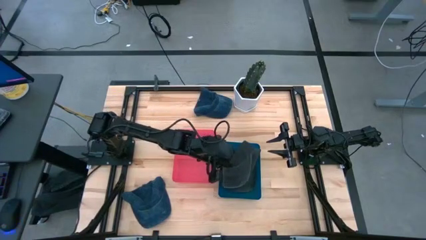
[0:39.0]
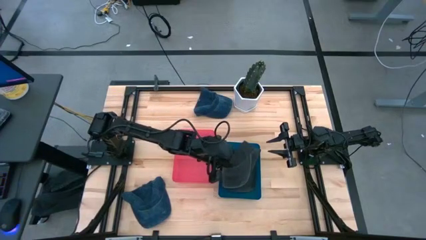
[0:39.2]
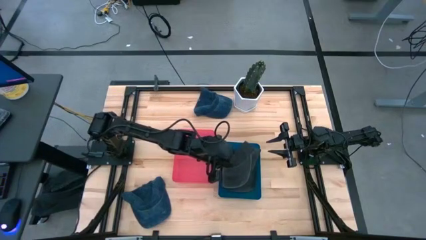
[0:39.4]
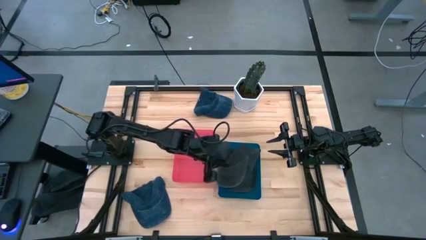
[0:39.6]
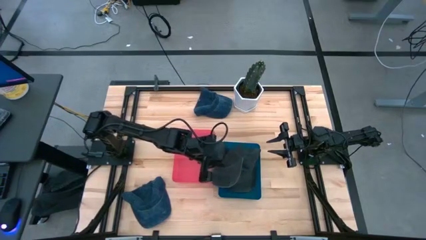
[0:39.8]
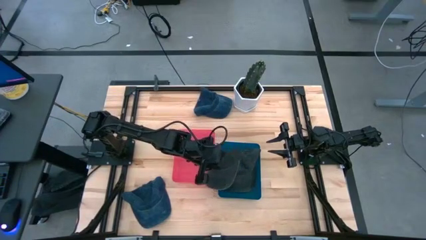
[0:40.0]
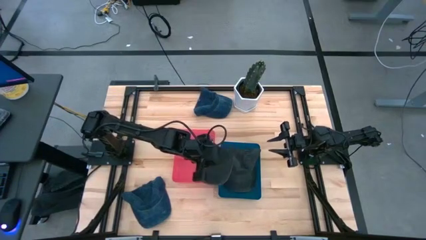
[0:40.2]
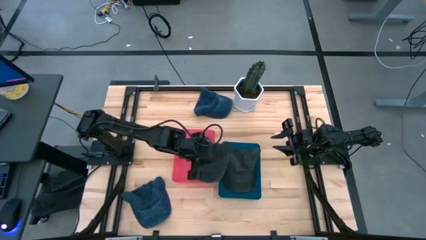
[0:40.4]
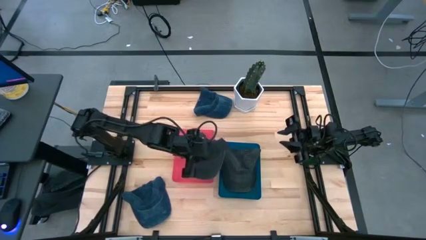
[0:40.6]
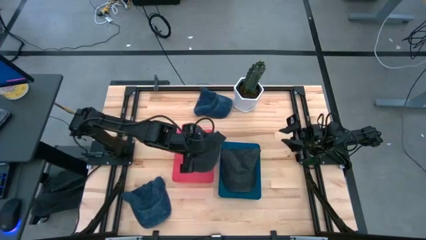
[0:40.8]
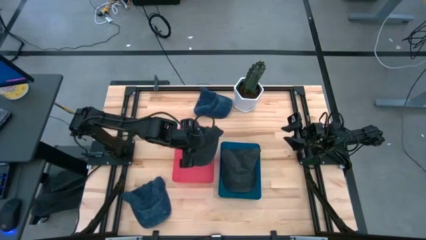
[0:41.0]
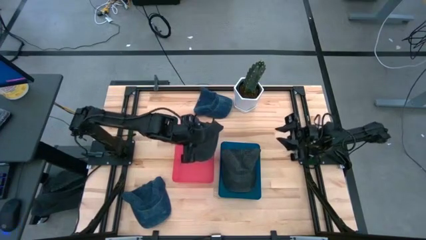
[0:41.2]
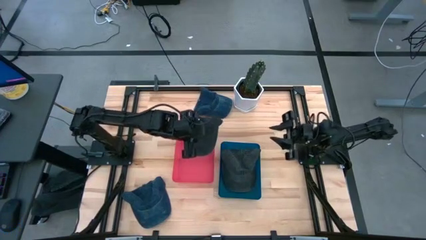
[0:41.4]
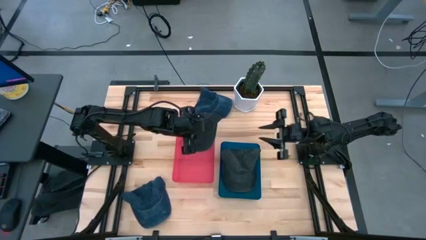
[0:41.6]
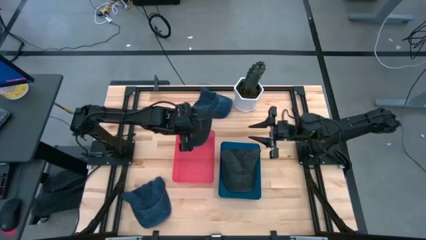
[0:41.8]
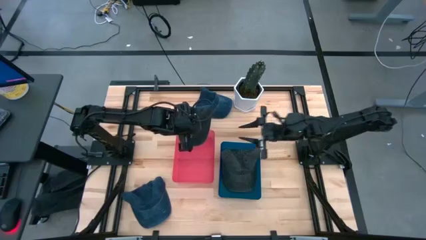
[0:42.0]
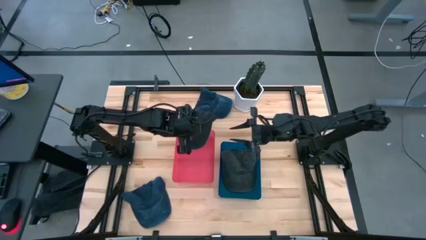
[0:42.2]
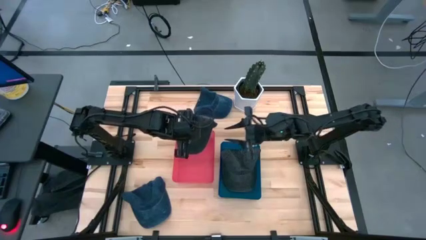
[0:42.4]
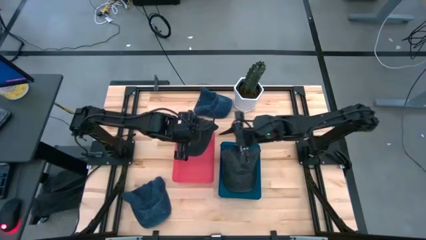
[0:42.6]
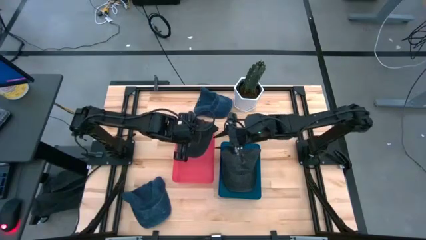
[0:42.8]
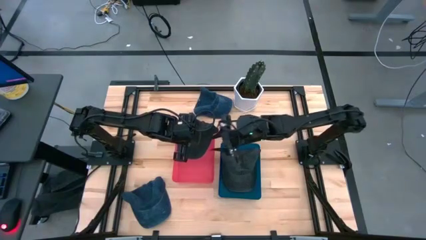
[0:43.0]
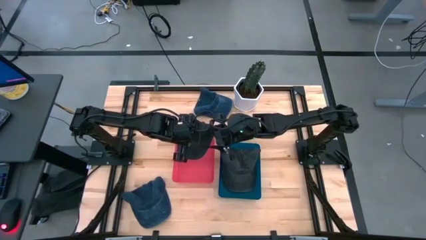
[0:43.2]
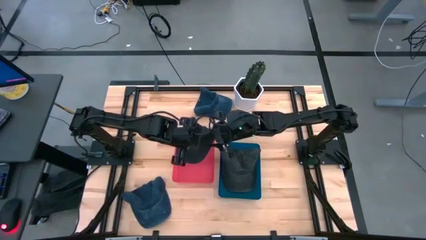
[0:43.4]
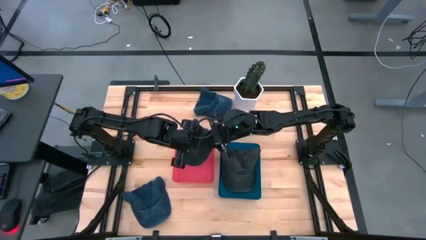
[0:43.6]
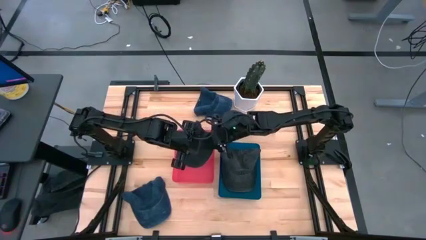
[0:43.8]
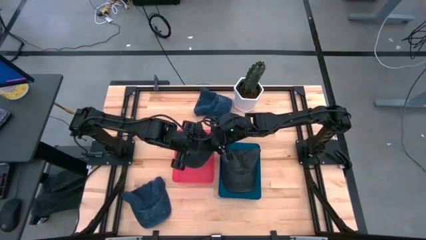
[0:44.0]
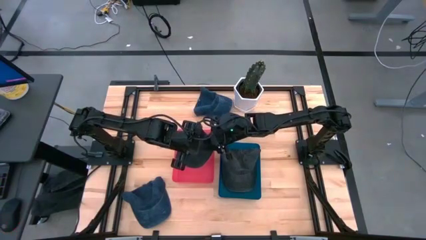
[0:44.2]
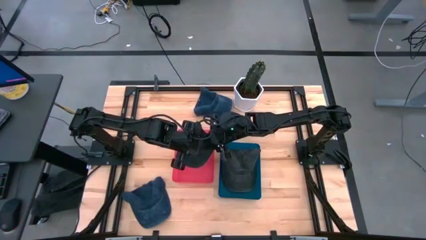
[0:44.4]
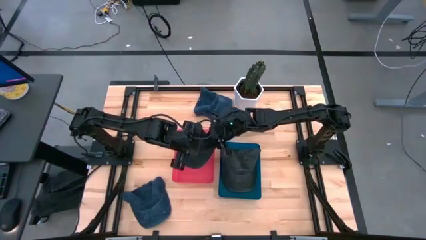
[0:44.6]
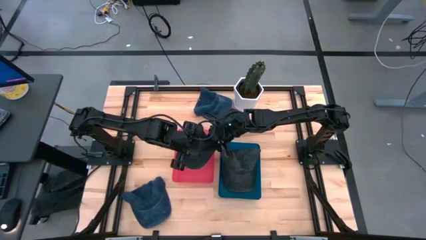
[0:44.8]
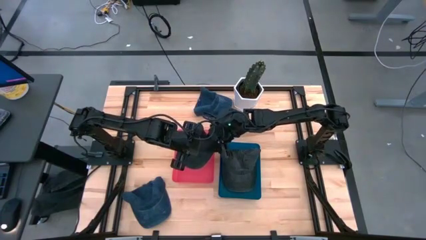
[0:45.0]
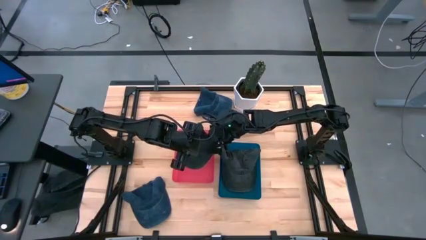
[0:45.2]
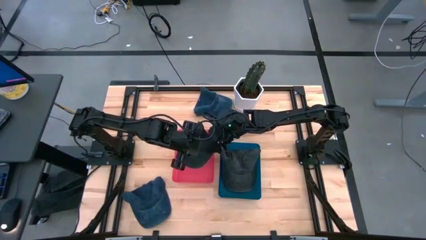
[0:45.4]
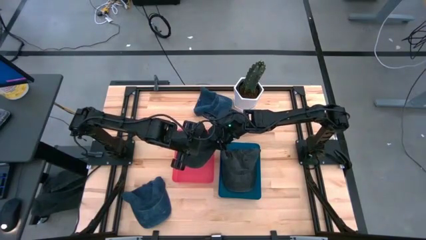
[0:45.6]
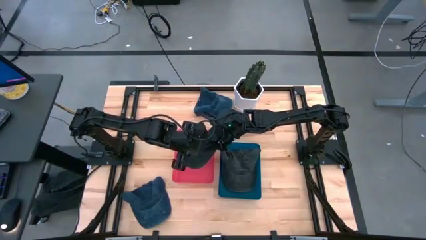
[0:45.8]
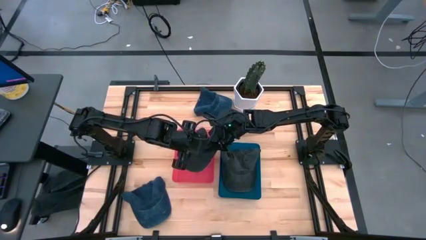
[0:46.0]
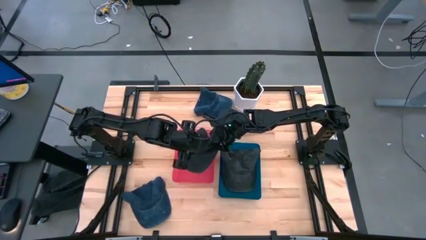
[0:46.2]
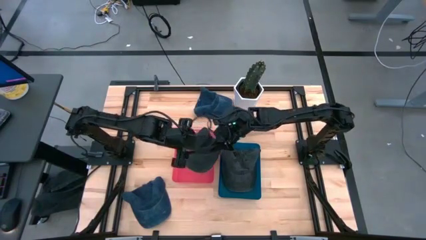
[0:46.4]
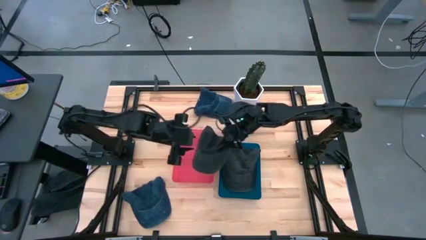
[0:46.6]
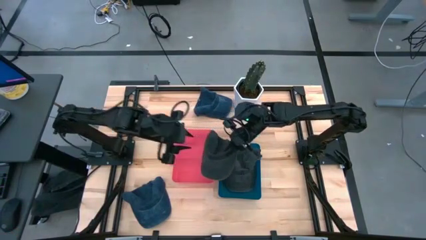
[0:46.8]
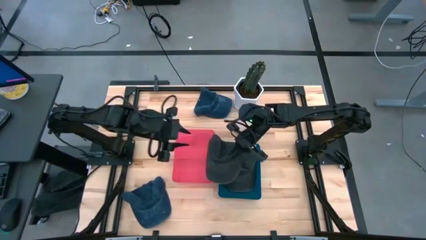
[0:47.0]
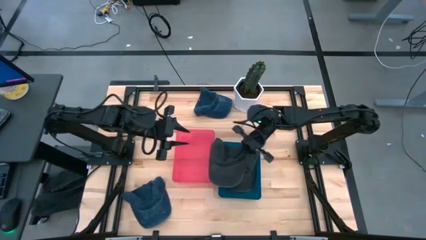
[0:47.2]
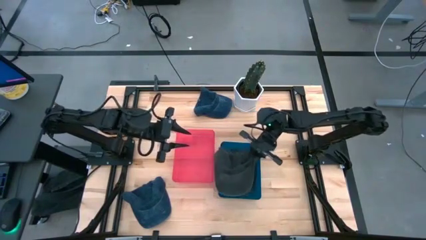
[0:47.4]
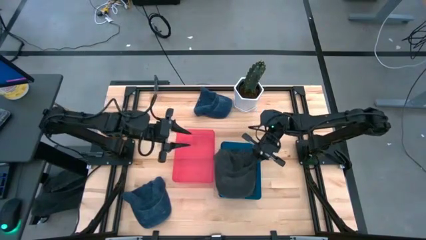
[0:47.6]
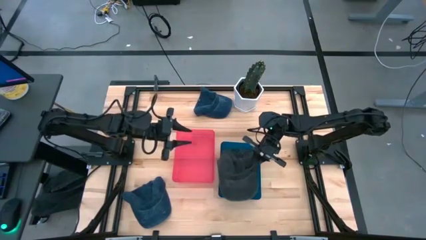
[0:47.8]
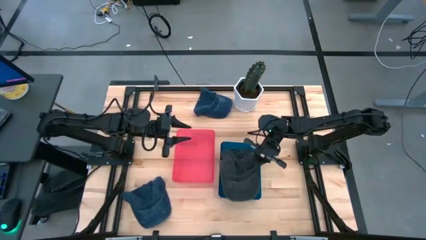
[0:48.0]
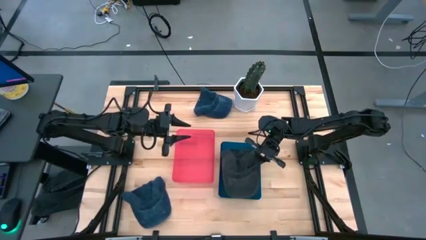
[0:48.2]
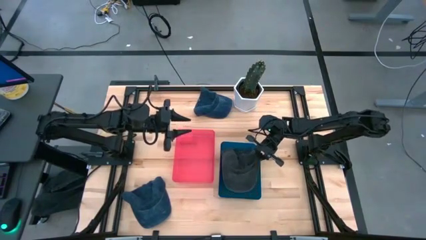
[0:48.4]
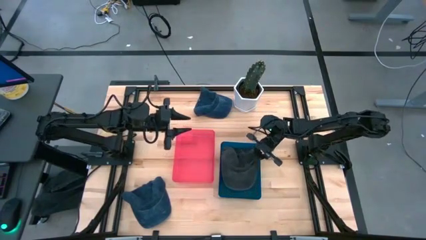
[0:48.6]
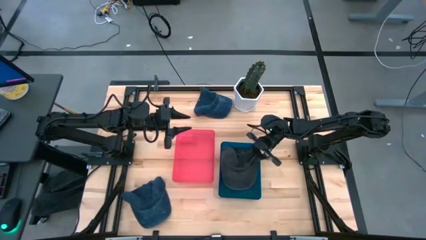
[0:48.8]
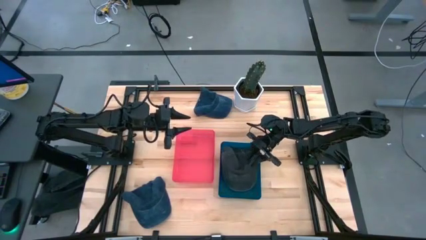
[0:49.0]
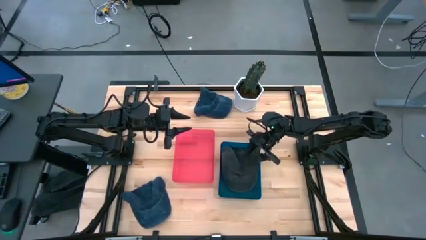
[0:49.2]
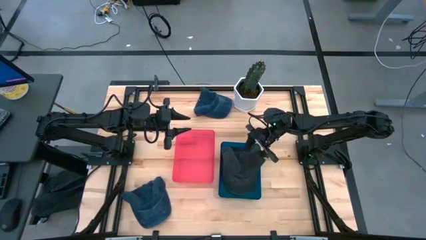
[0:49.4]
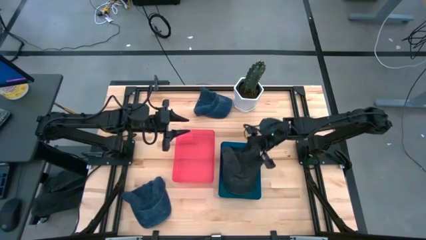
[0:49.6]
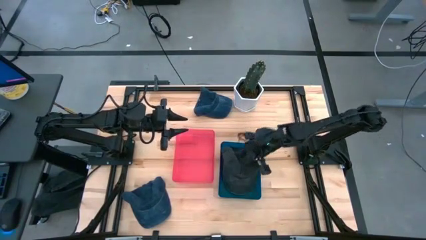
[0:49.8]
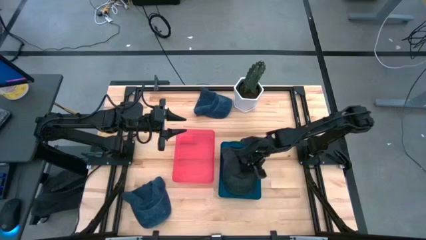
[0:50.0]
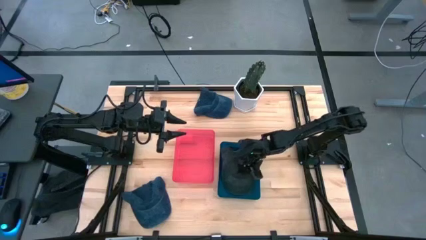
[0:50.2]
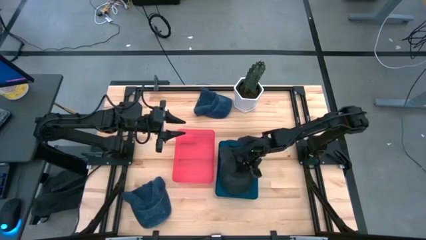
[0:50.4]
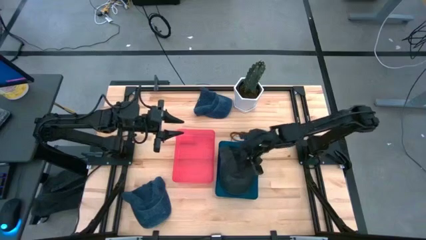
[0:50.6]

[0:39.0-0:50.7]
Task: Pick & Place hat
Put the black cap into the blue bin

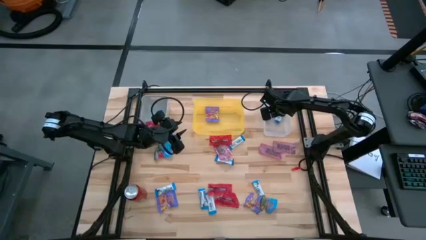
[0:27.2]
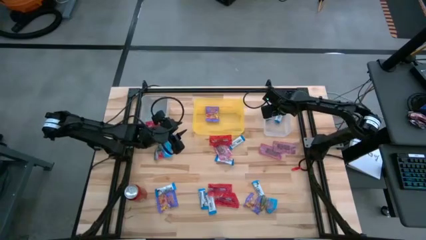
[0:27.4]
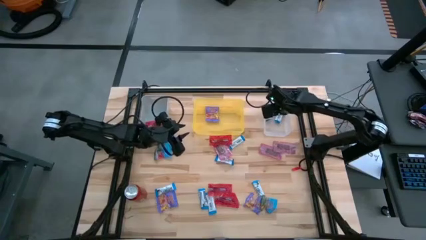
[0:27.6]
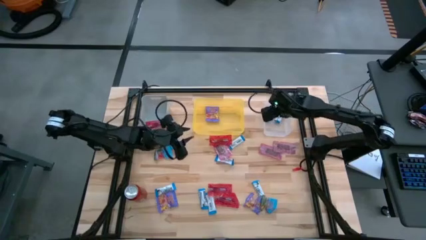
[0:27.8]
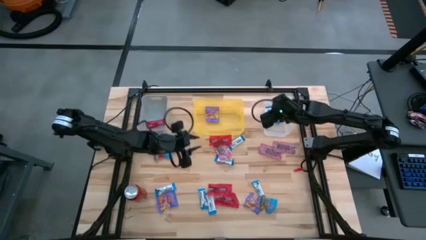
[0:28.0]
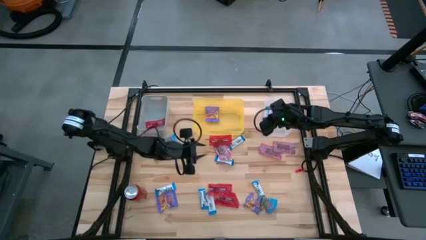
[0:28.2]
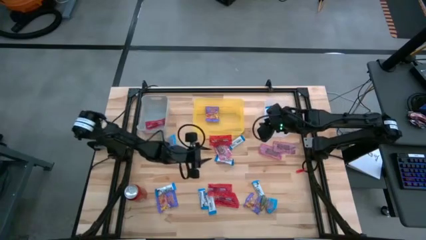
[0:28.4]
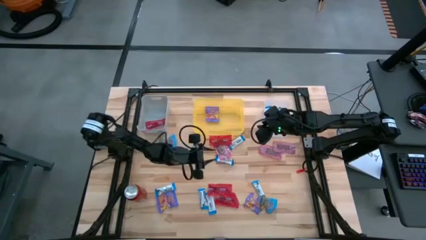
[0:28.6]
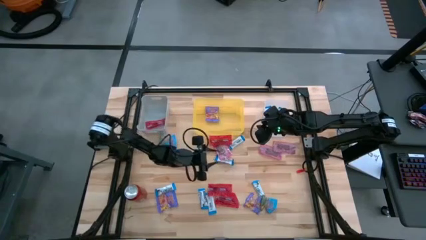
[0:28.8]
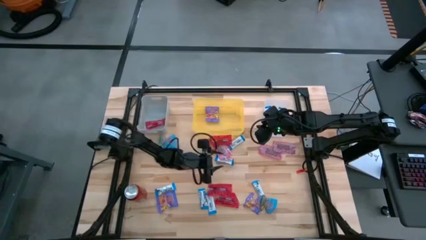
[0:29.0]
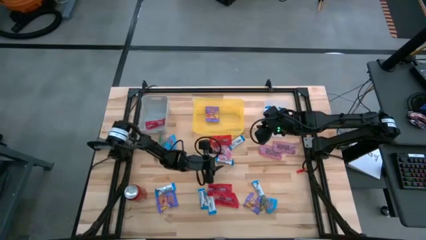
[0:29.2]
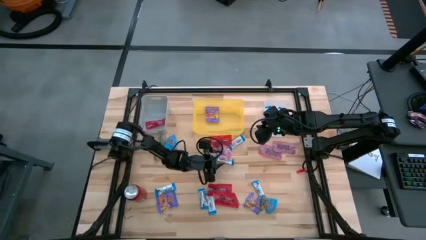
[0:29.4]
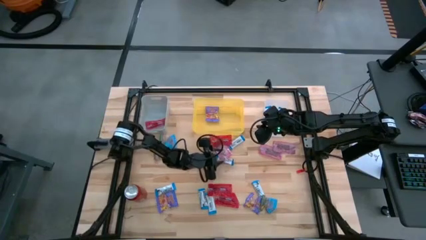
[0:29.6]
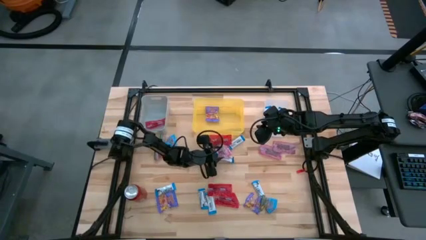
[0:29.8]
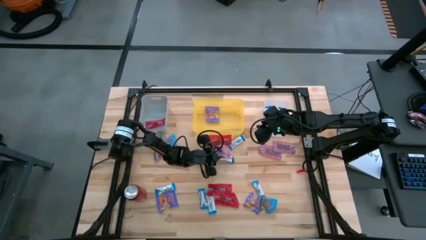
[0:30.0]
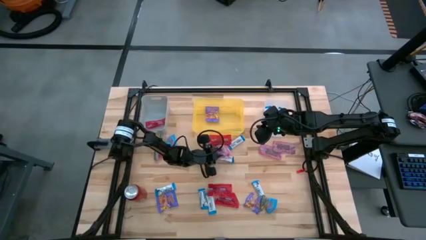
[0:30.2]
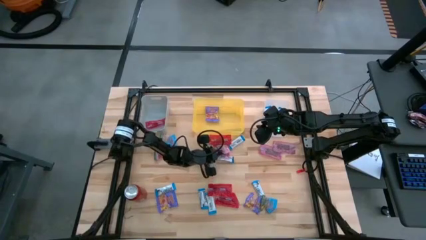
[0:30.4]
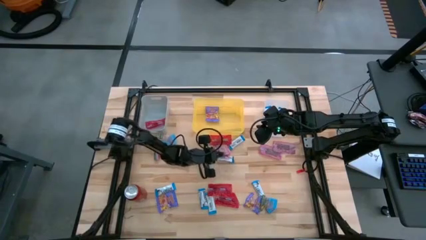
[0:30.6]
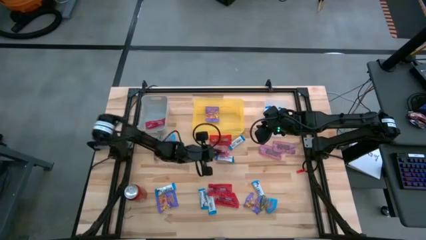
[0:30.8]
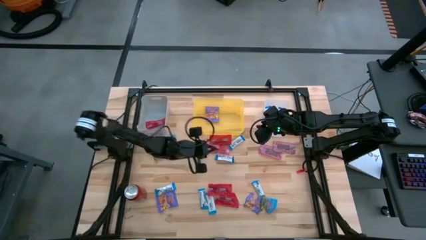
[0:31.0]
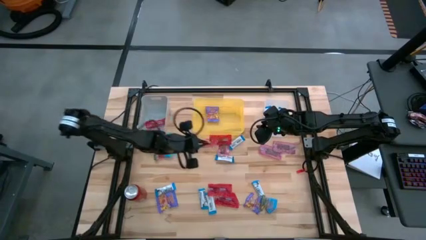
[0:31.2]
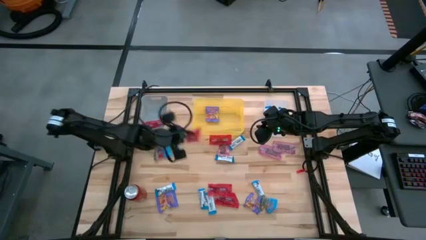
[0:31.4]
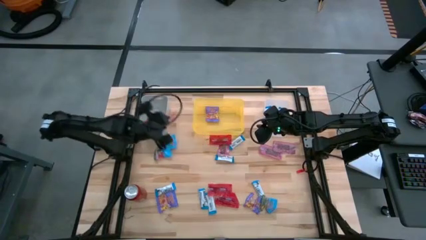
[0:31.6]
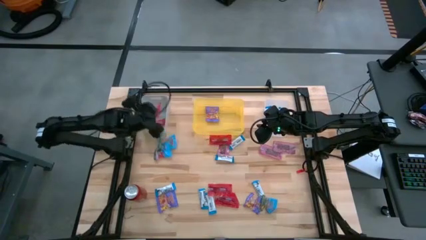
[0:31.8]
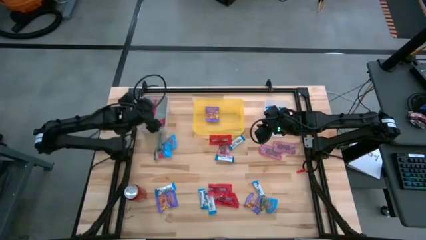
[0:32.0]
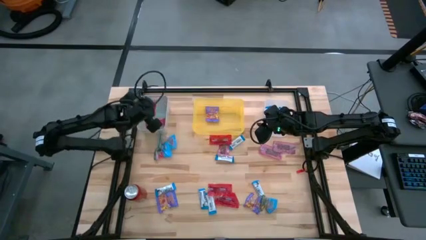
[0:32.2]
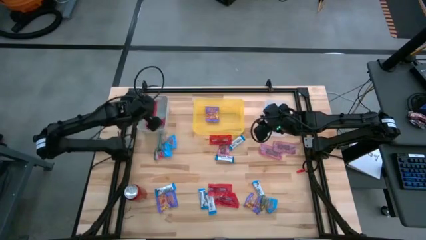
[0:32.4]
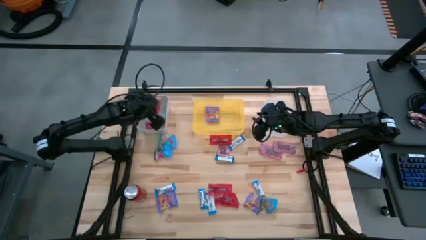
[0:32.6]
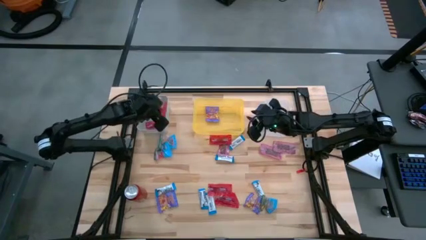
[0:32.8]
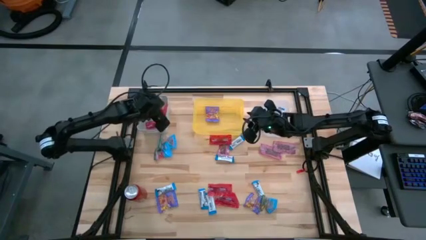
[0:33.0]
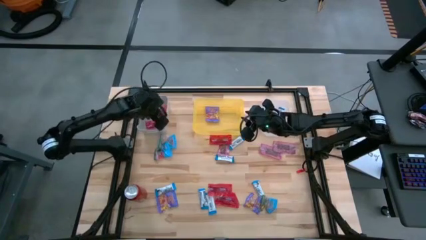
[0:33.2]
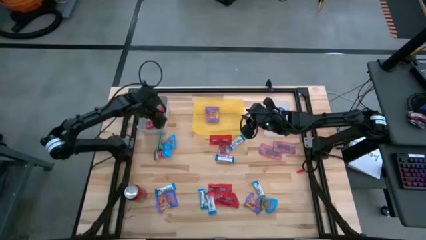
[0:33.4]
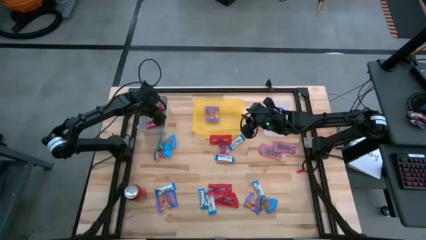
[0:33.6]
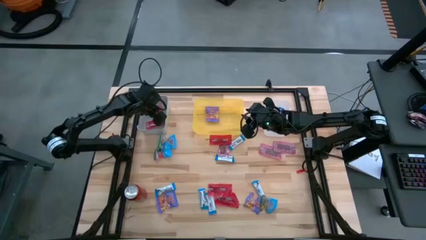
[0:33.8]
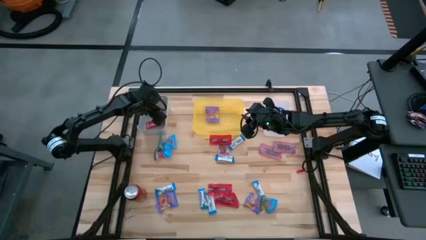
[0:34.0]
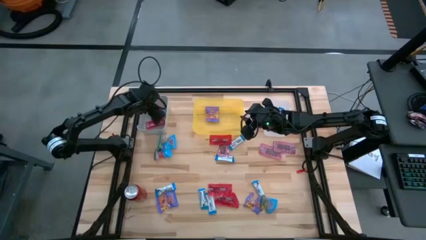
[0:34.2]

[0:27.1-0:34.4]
Task: Sort candy
Put the red gummy into the gray bin
